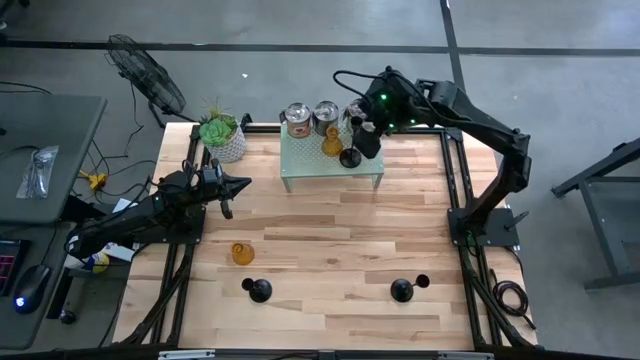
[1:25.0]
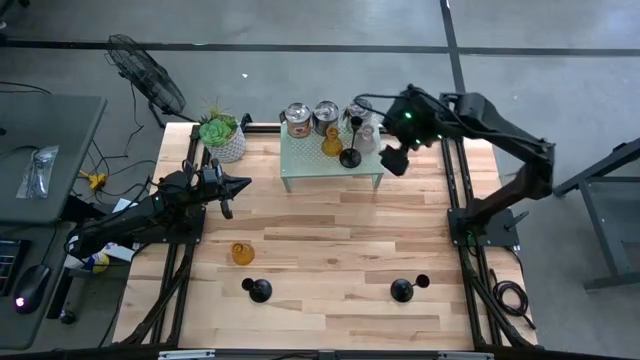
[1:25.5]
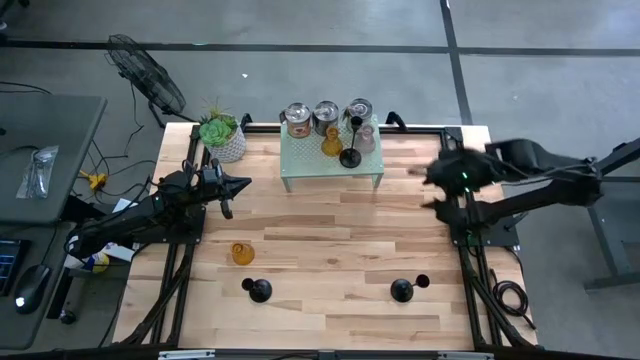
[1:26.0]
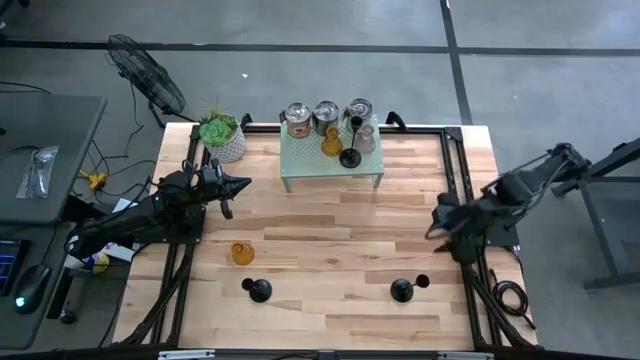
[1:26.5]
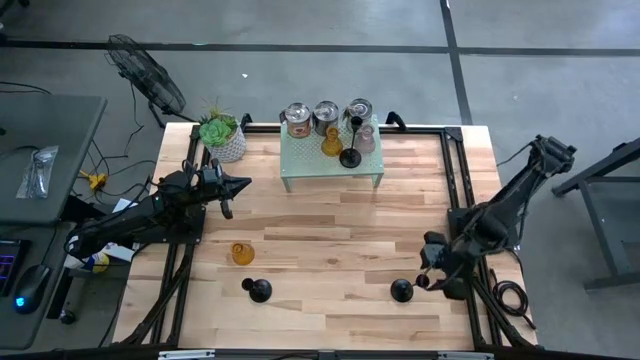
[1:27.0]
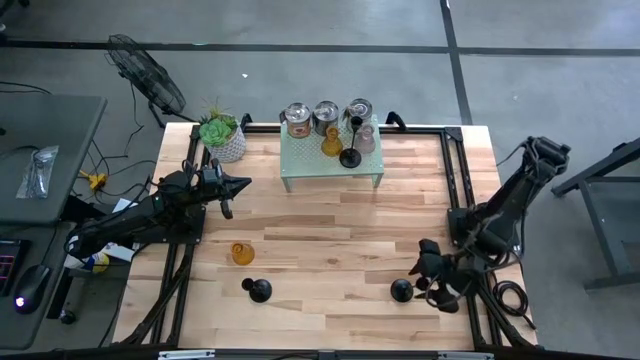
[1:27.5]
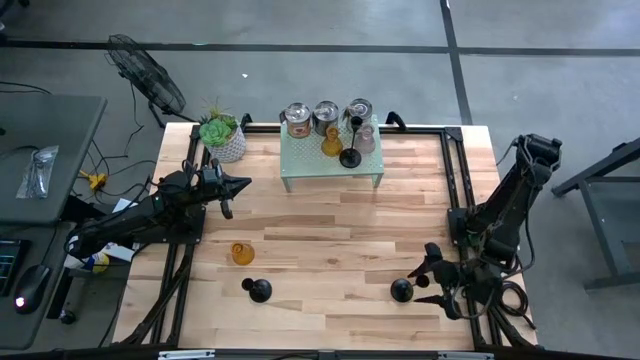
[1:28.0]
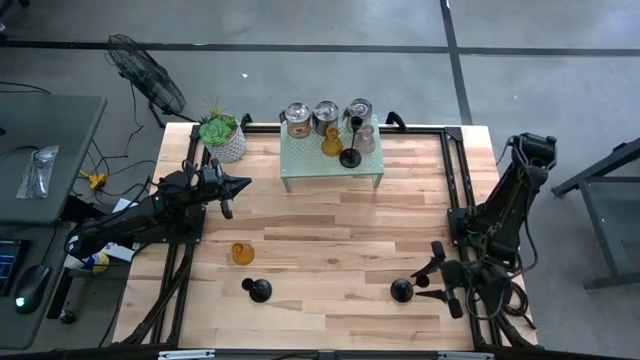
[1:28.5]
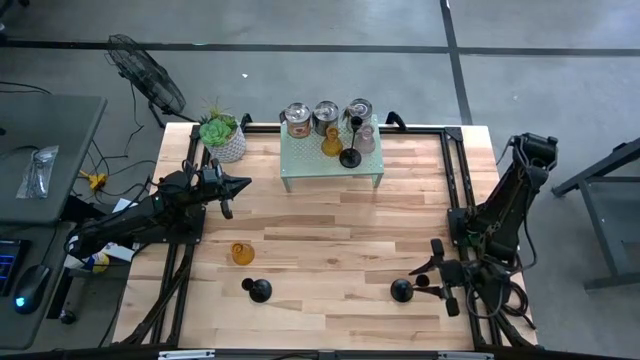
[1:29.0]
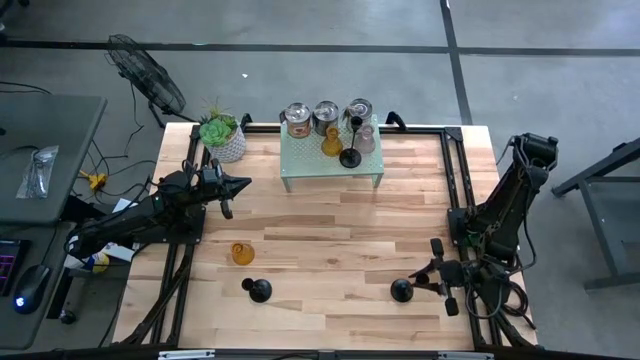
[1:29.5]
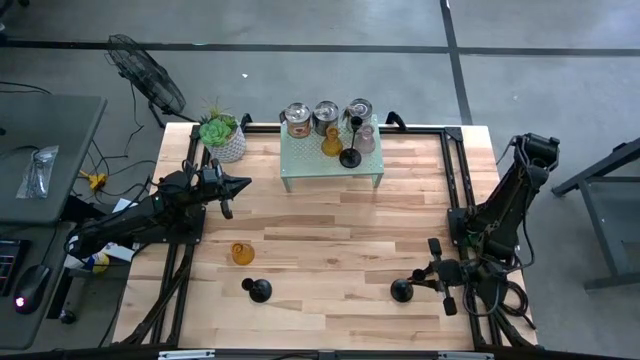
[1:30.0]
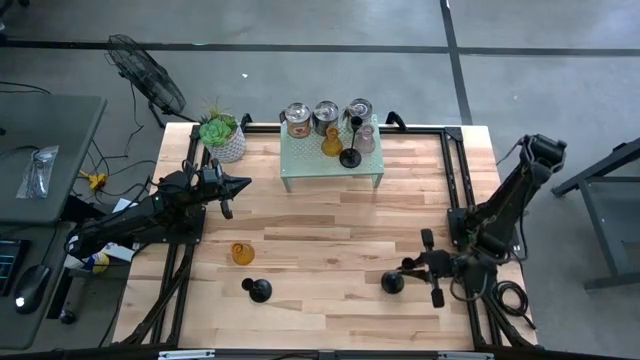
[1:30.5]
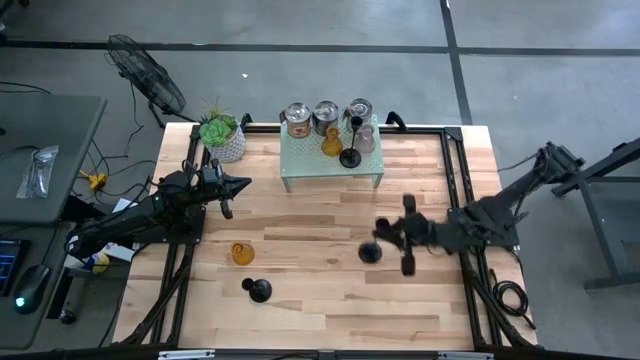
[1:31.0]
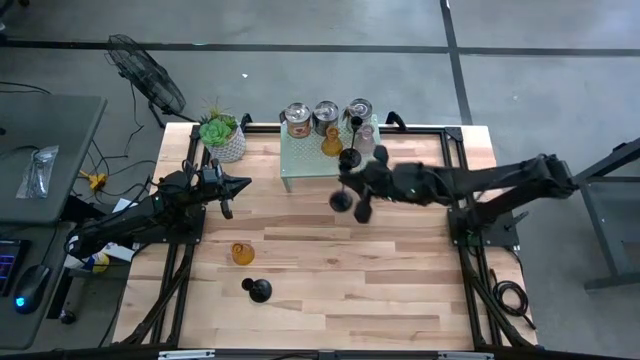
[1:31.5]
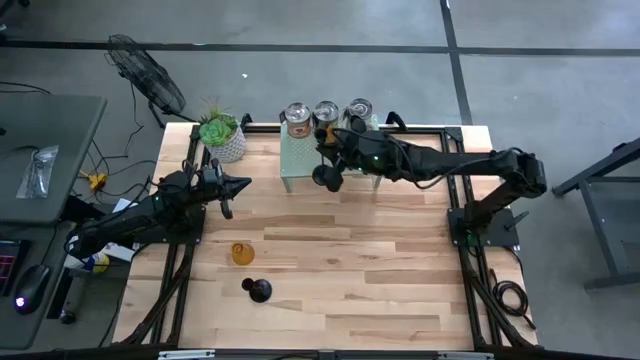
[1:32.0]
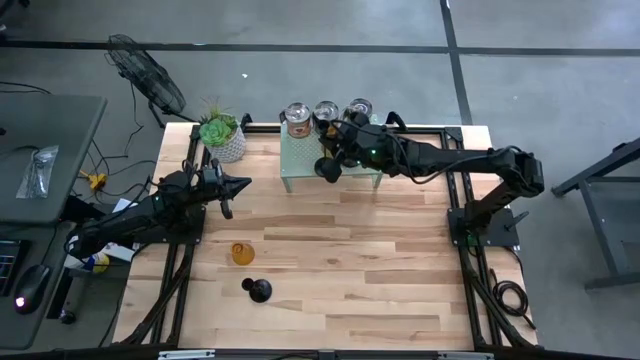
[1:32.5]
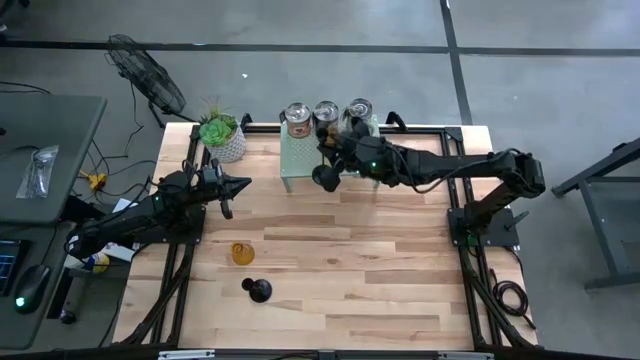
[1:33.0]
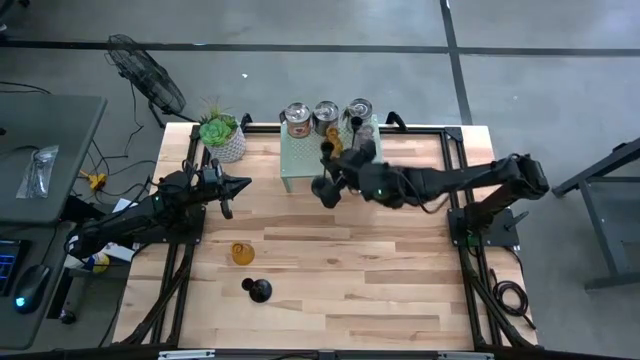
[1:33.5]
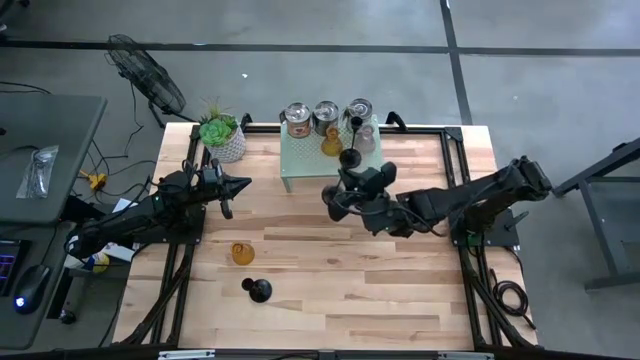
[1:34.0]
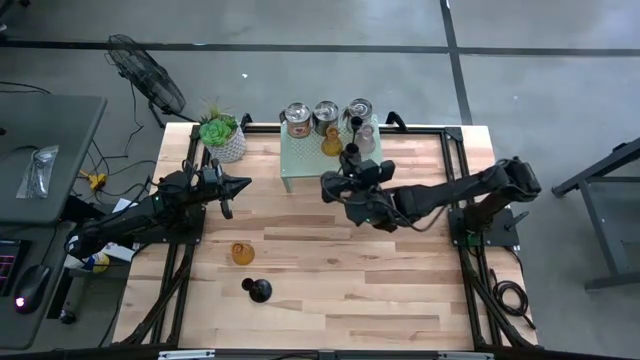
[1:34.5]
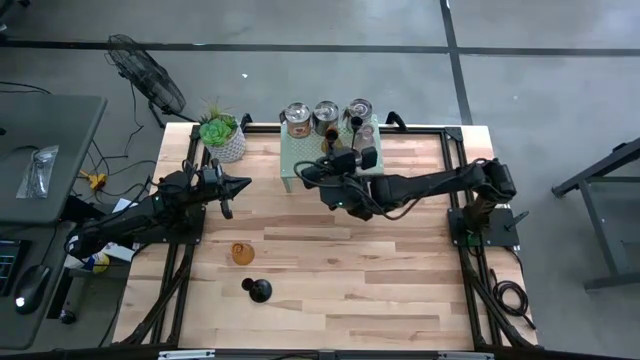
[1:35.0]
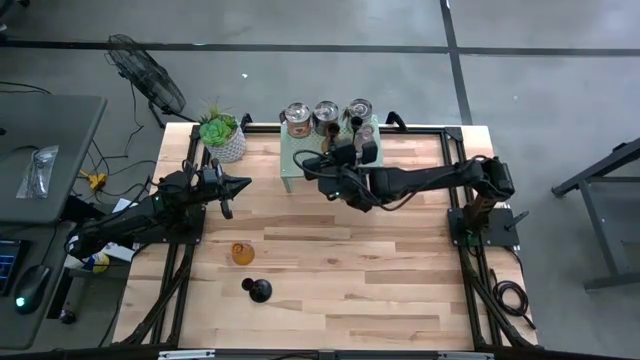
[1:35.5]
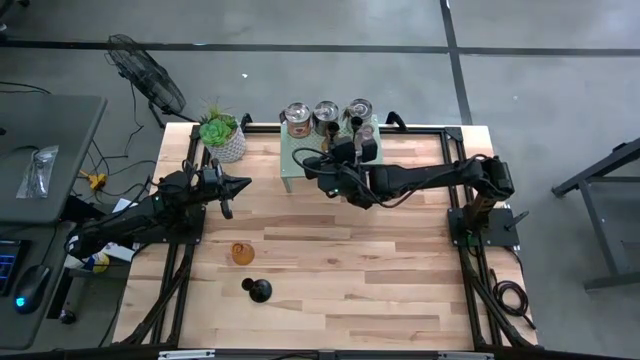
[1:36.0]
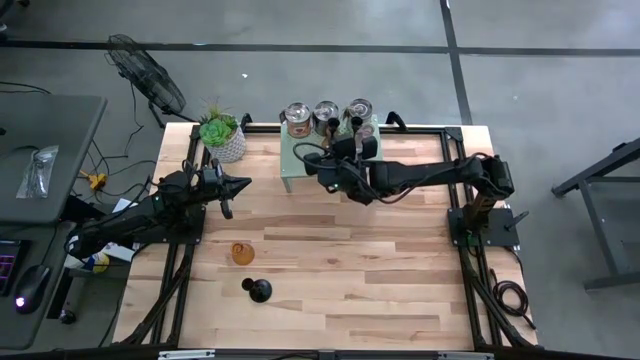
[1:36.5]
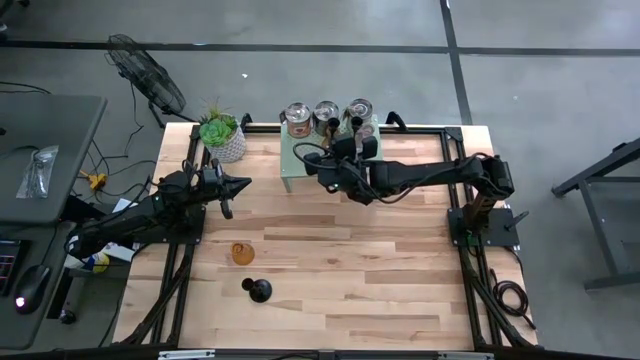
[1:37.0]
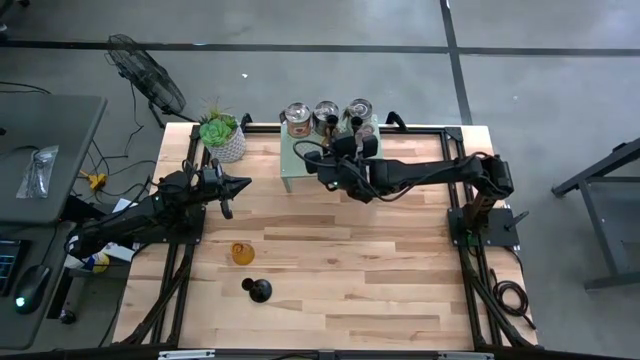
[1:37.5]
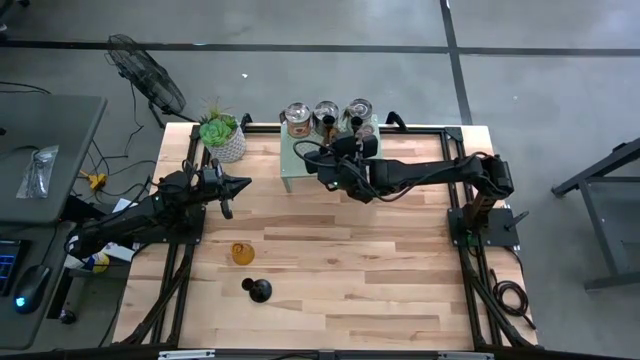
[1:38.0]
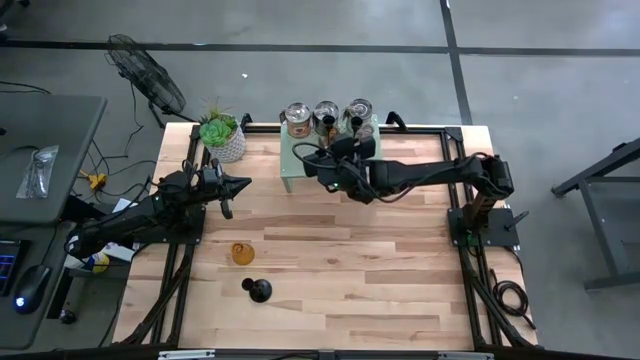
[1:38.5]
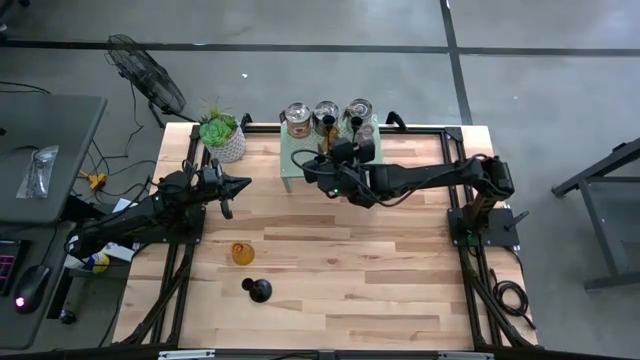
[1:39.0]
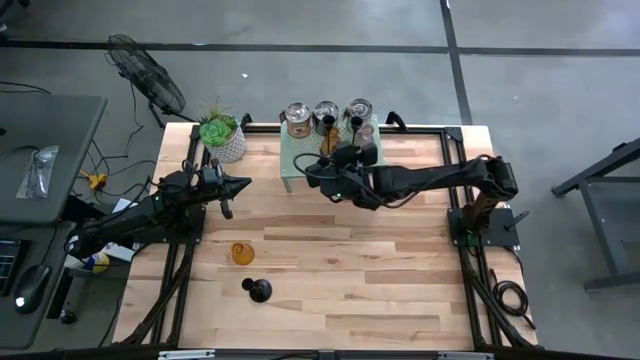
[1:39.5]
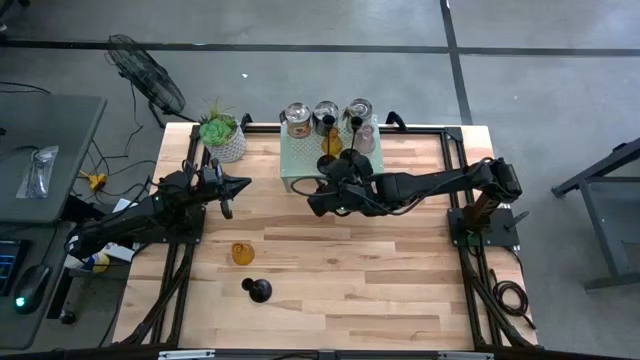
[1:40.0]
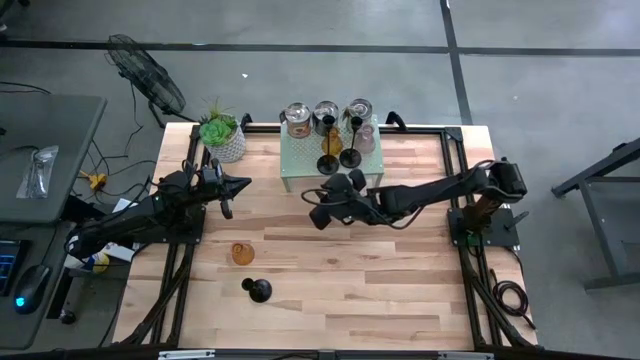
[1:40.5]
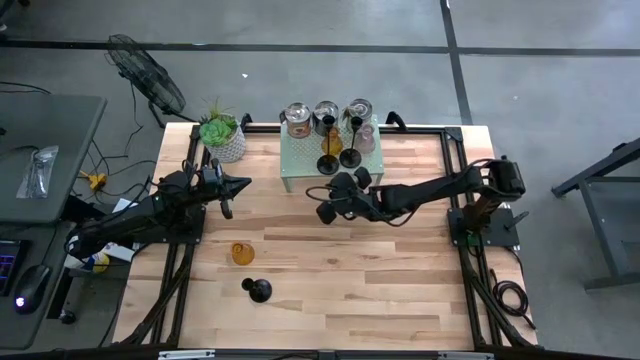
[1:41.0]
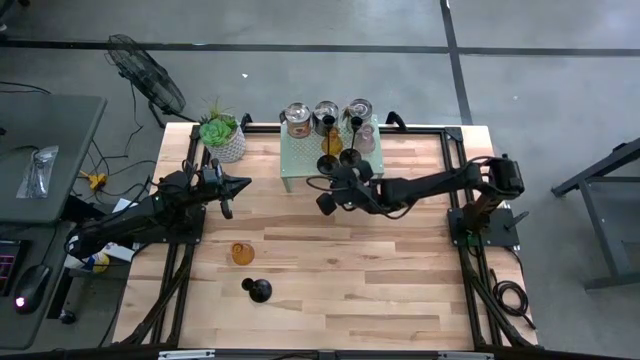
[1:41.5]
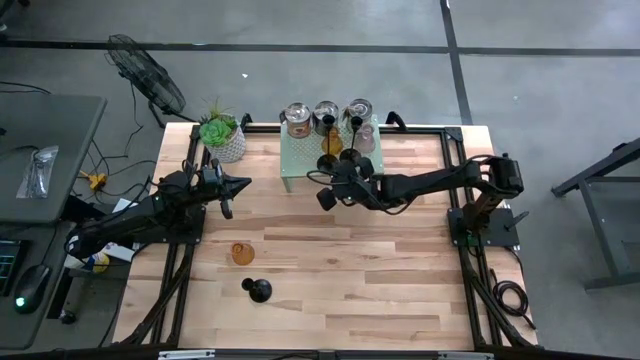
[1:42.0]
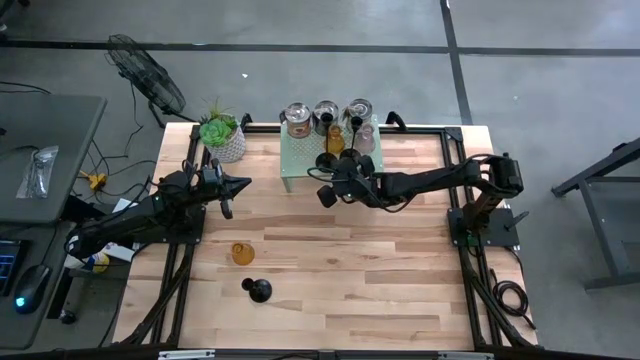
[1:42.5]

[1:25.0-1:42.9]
Task: Pick & Place candle stick holders
Put the right black candle holder on the shelf

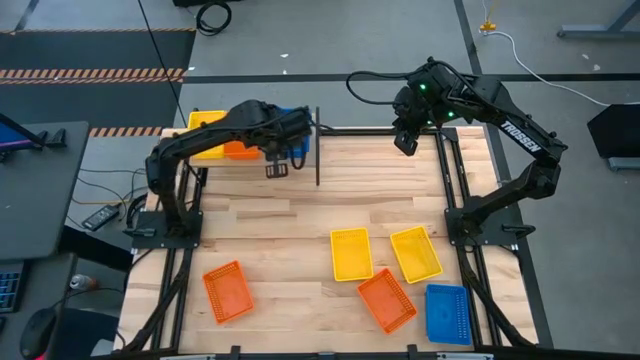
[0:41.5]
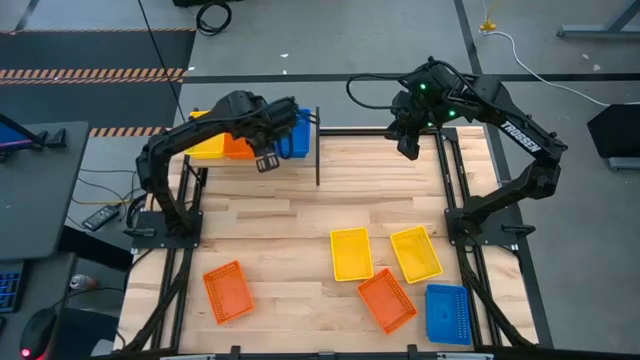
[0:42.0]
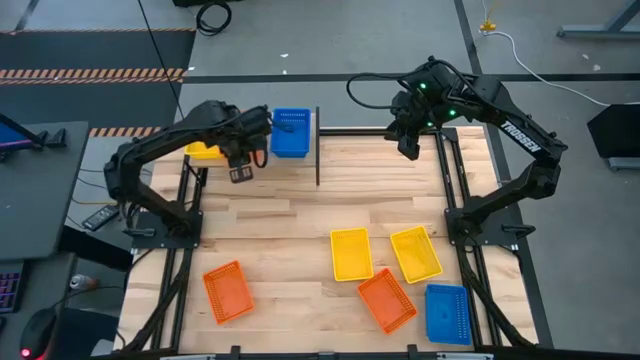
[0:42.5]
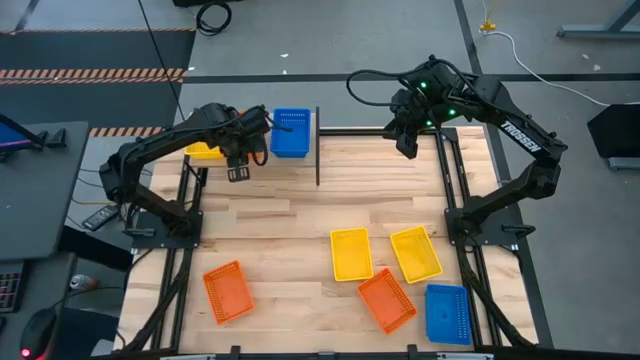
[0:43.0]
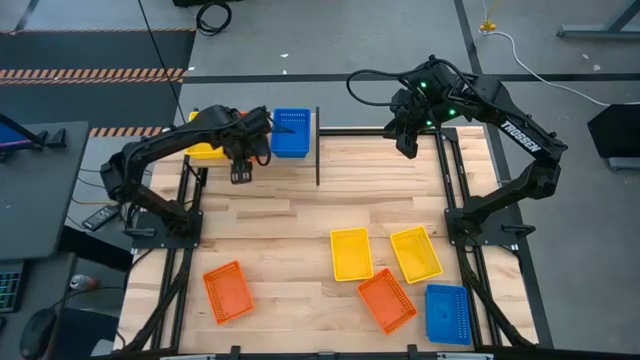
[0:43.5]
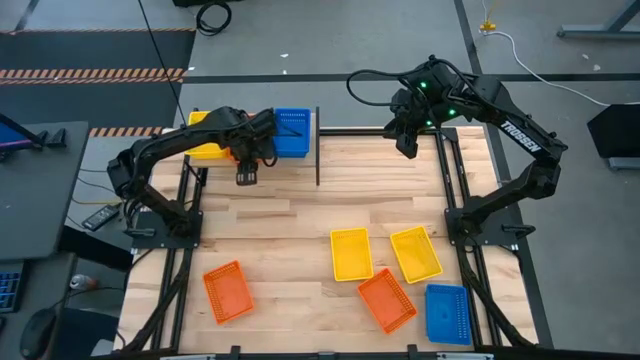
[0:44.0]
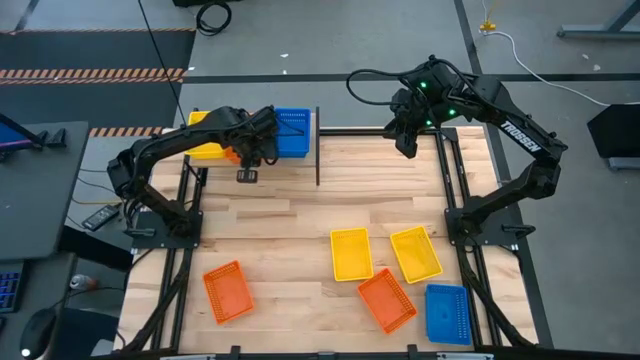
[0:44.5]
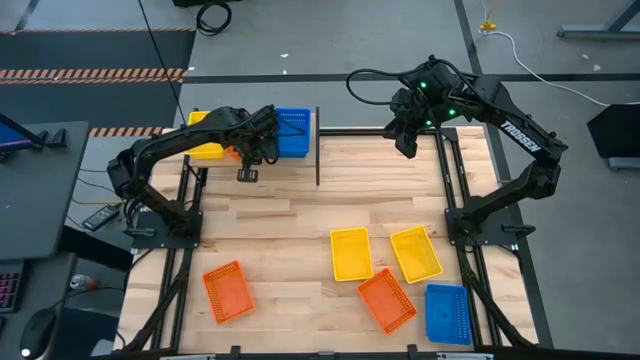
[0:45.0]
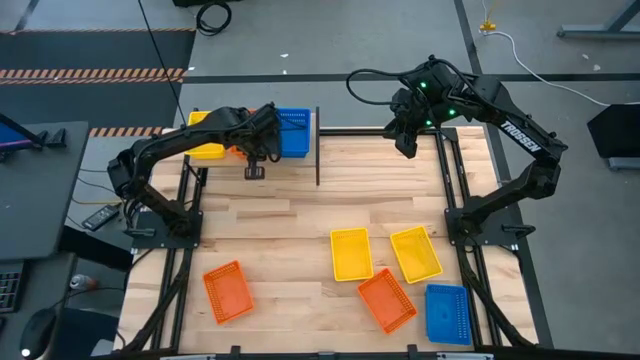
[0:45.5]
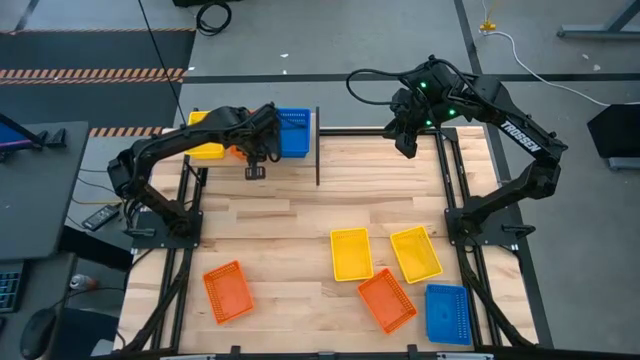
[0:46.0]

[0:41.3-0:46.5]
Task: Stack baskets on shelf by color
Adjust the orange bin
